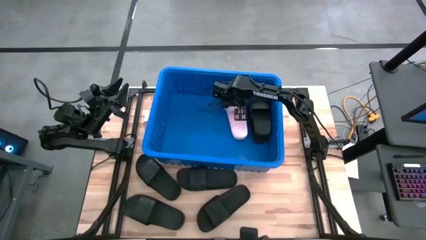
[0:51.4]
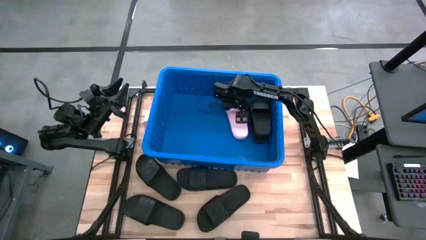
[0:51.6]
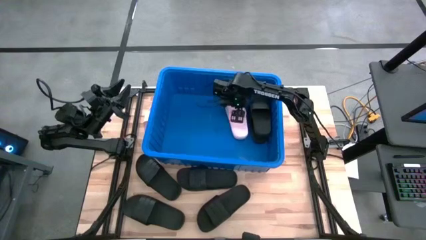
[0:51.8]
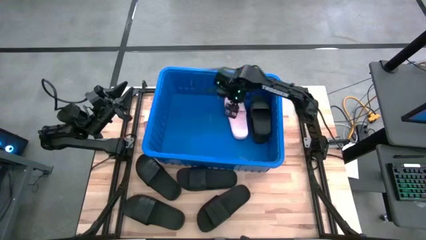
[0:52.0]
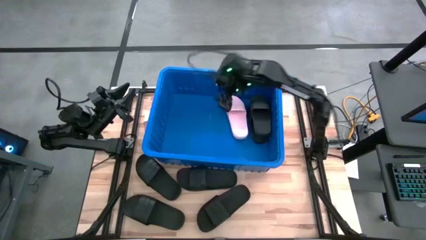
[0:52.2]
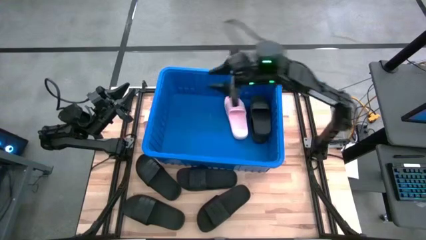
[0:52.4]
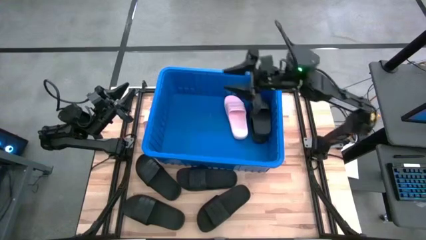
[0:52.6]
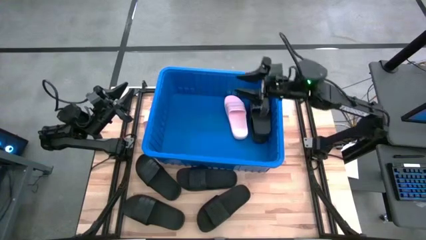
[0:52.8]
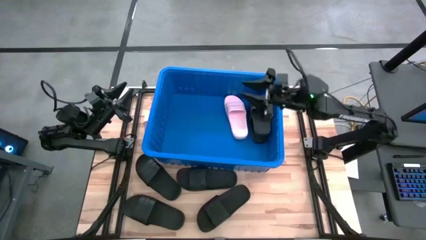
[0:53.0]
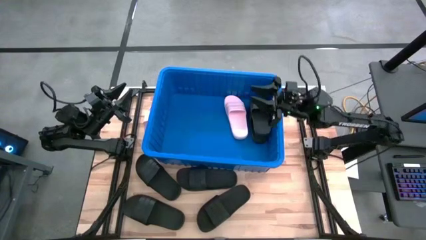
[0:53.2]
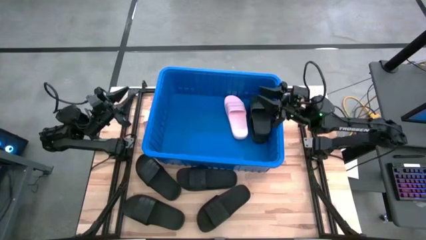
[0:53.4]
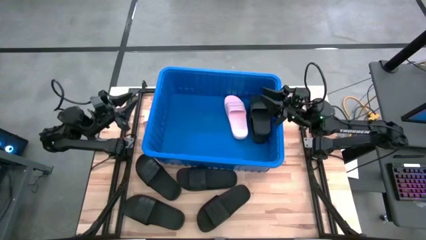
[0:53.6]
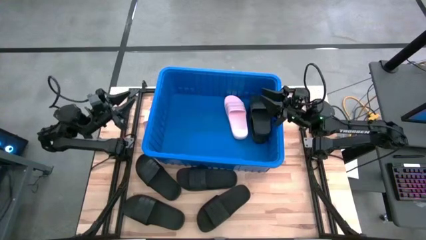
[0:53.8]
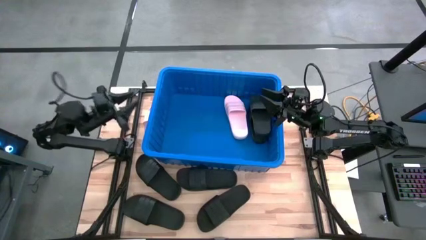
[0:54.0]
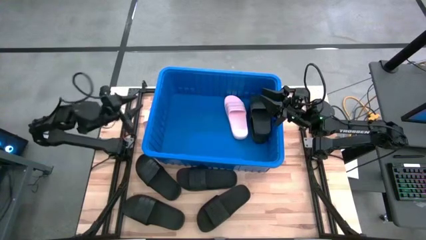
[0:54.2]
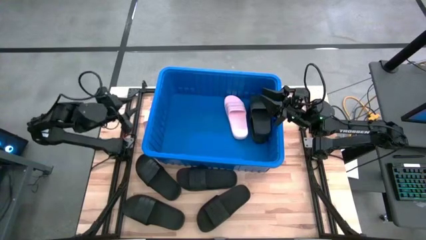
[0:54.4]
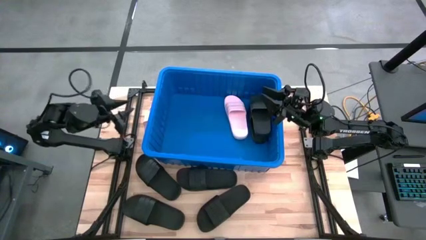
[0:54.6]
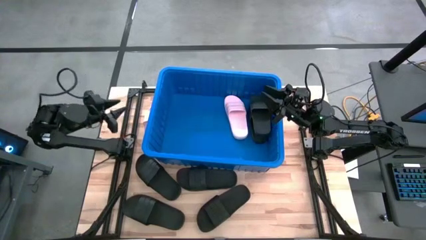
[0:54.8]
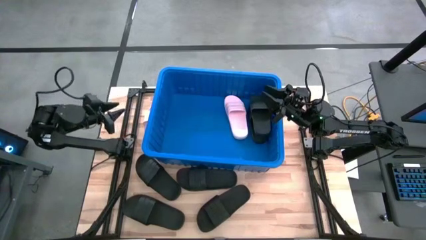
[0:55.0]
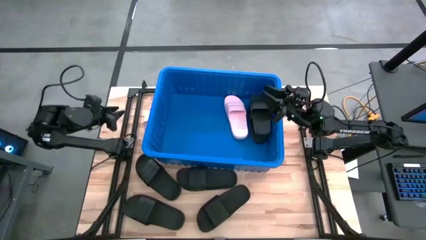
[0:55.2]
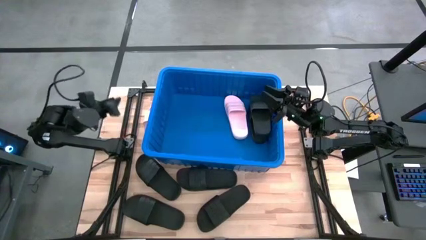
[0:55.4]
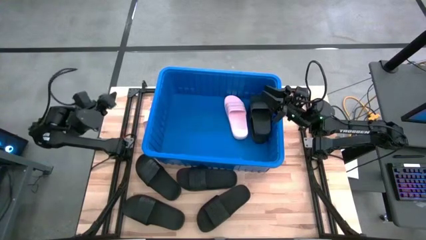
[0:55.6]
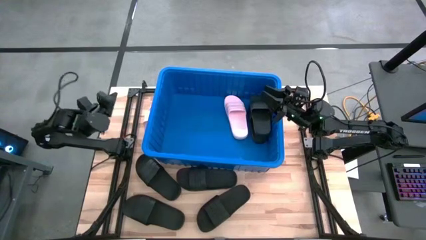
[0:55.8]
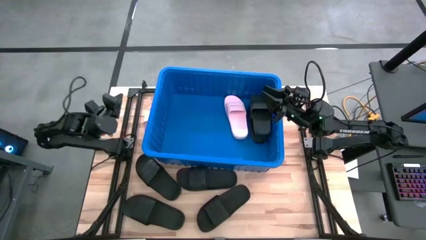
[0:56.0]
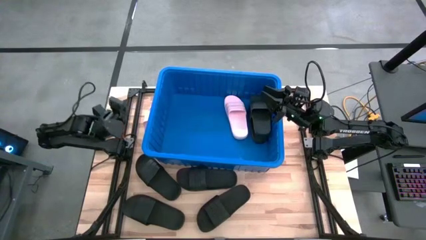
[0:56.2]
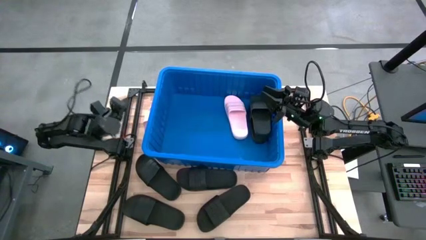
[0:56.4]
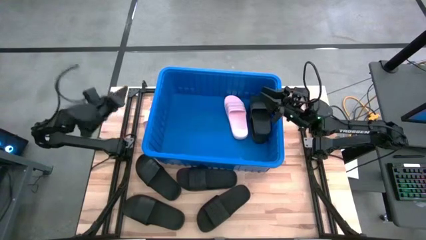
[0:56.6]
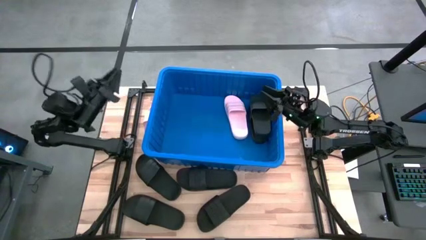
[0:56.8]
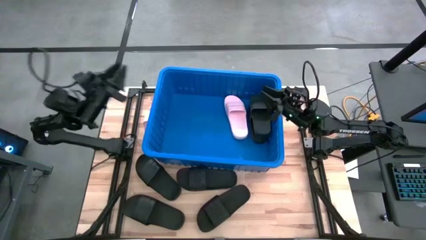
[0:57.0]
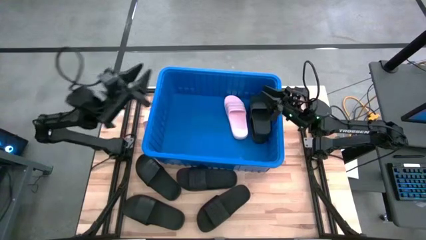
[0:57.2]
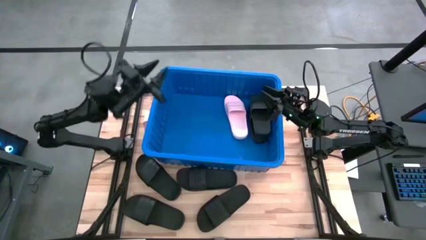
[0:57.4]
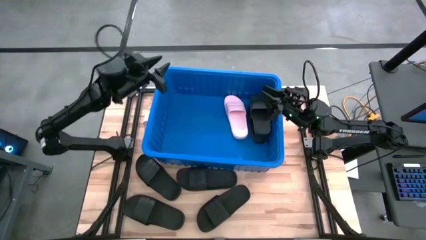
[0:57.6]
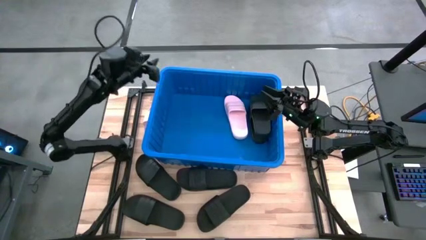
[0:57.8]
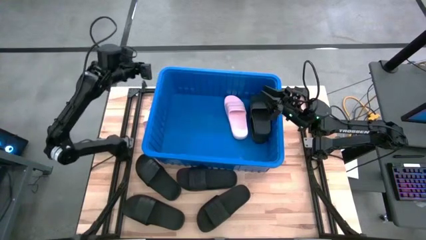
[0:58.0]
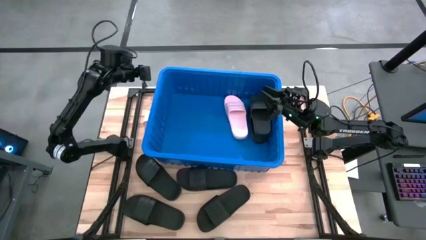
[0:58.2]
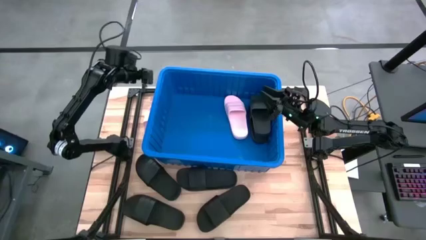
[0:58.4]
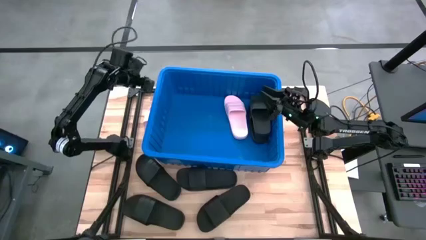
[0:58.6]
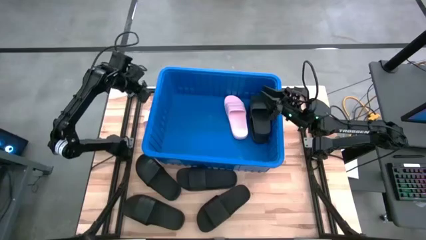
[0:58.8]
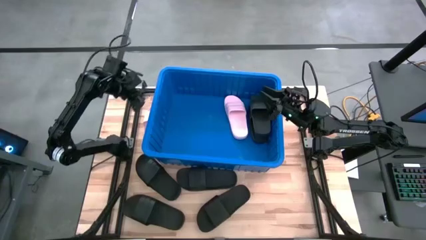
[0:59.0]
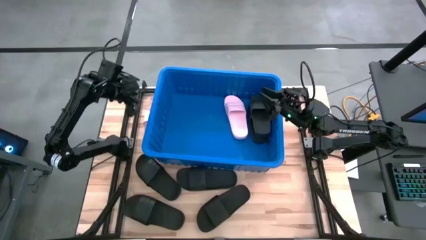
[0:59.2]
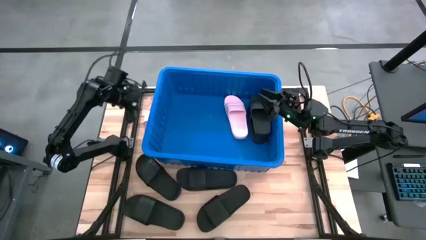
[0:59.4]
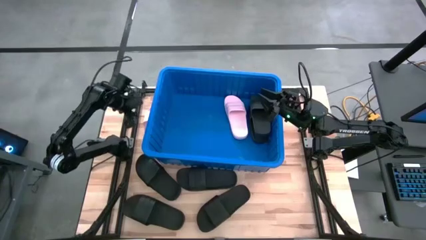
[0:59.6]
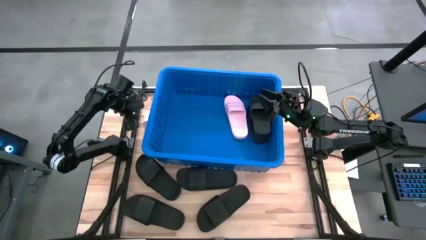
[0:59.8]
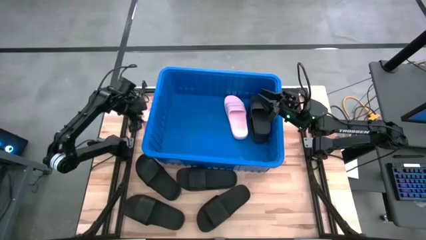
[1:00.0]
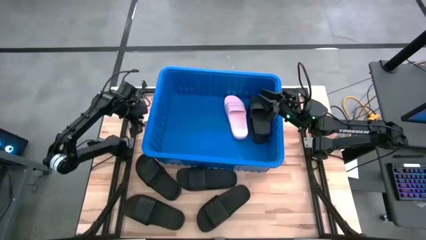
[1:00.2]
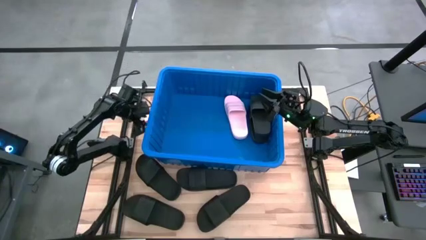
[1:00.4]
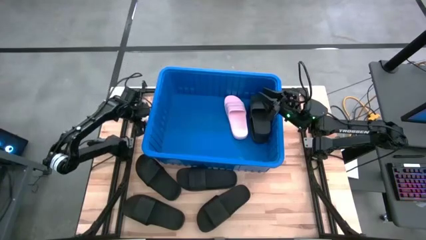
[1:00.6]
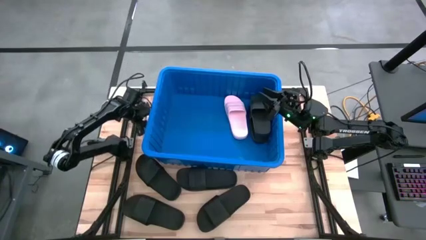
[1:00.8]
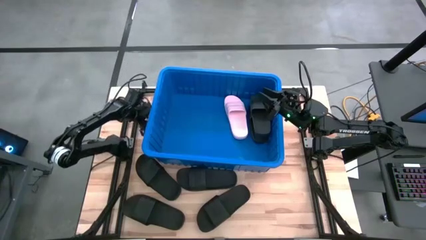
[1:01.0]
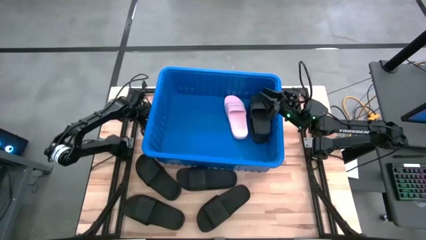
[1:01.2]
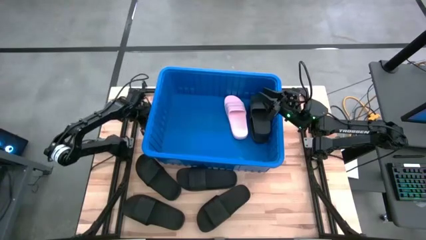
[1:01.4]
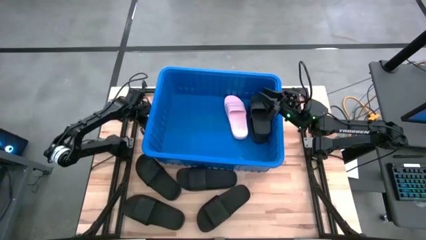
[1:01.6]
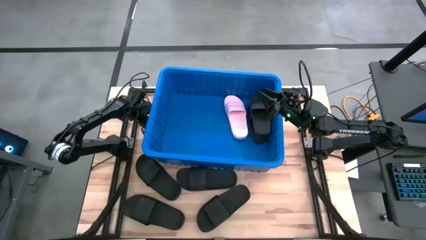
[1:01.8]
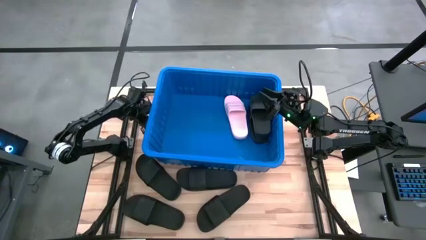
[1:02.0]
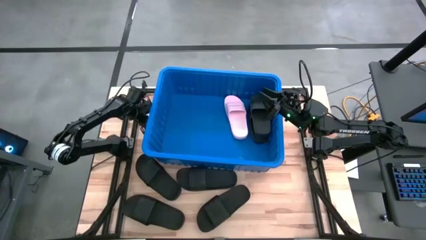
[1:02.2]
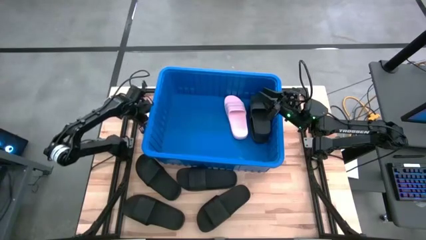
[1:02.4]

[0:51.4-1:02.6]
Task: Pick and place slides into bin
Put the pink slide into the blue bin
